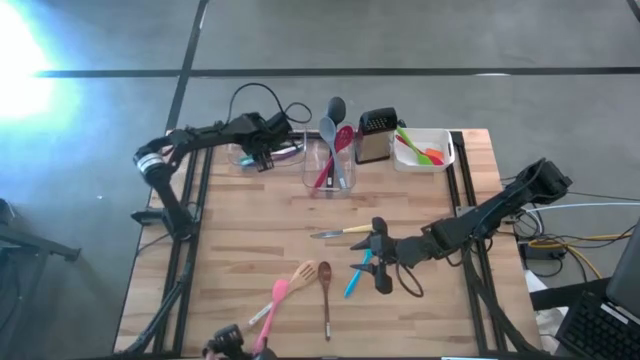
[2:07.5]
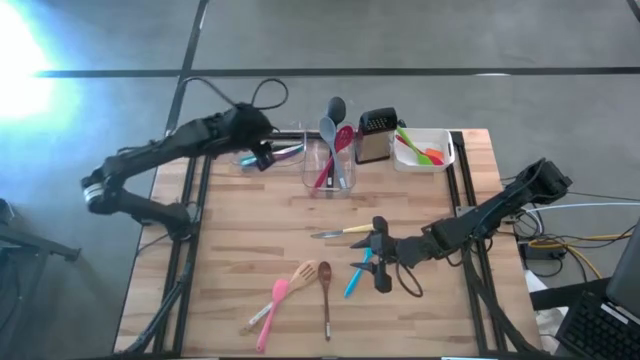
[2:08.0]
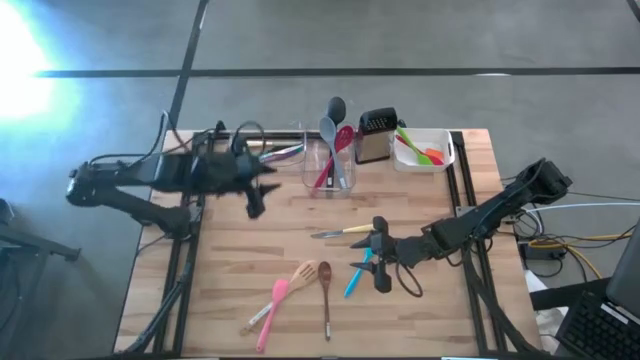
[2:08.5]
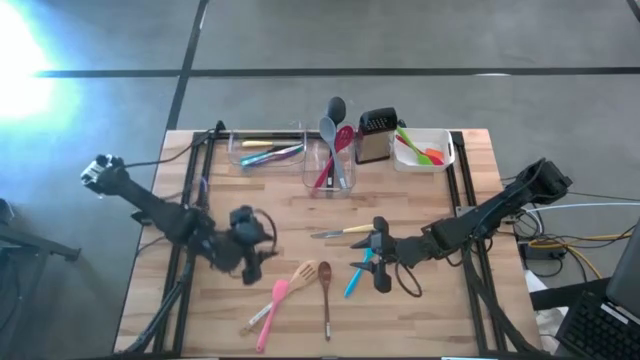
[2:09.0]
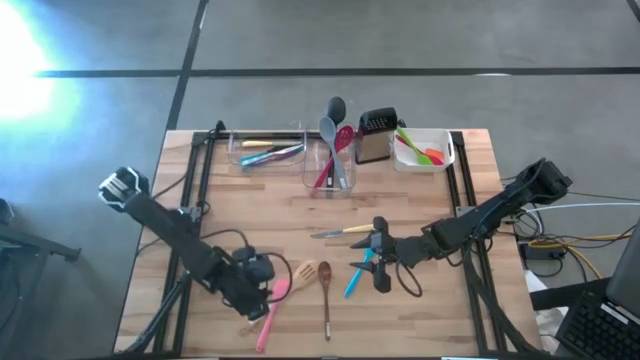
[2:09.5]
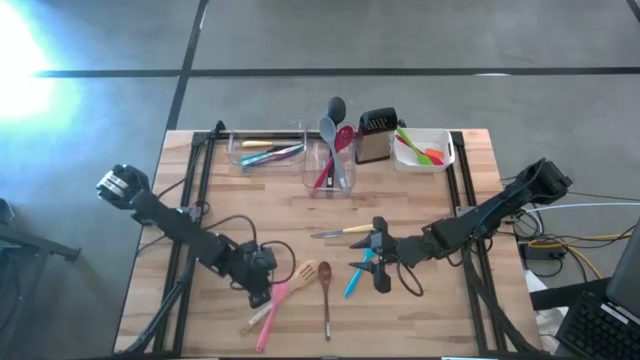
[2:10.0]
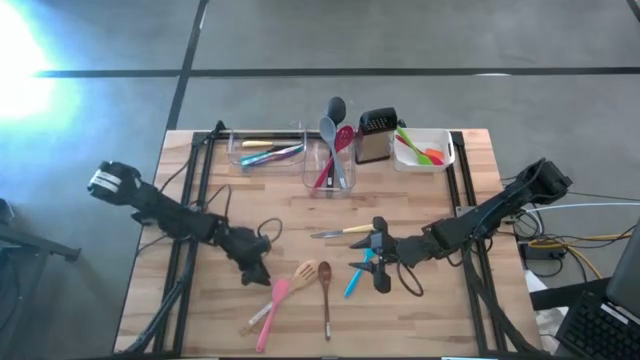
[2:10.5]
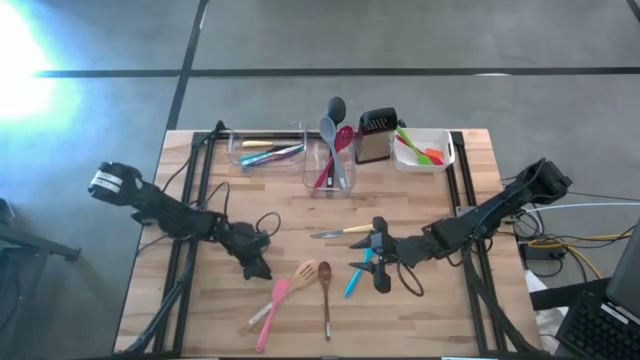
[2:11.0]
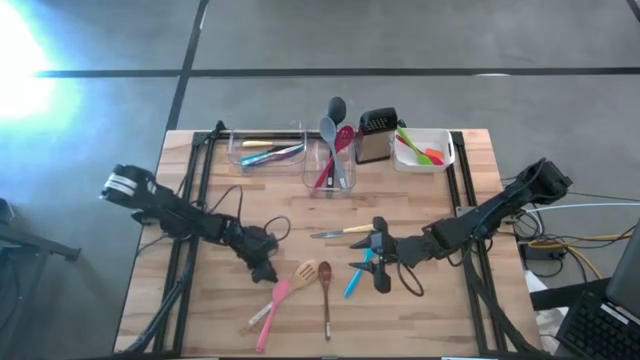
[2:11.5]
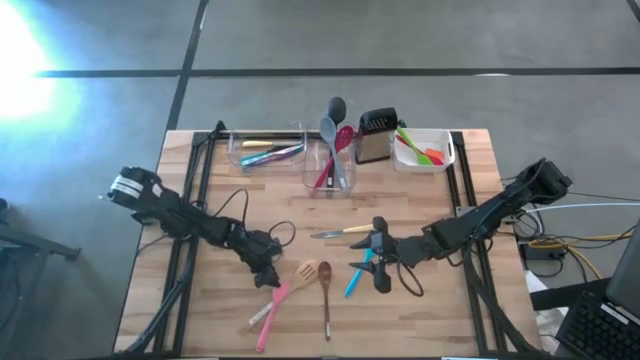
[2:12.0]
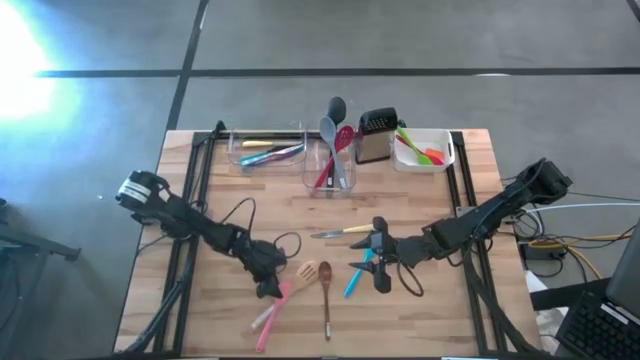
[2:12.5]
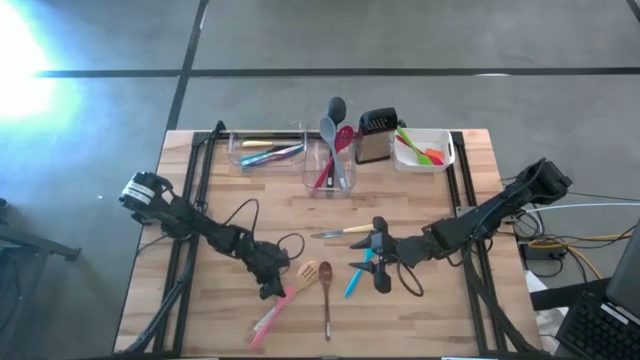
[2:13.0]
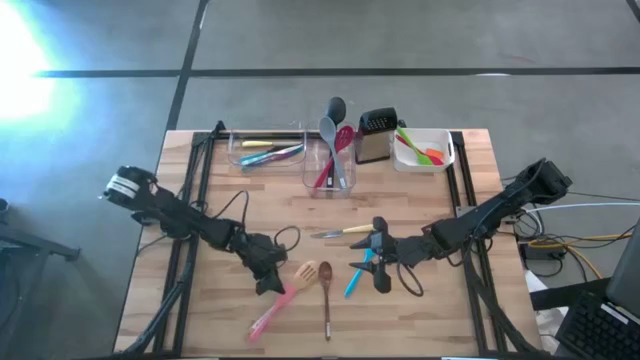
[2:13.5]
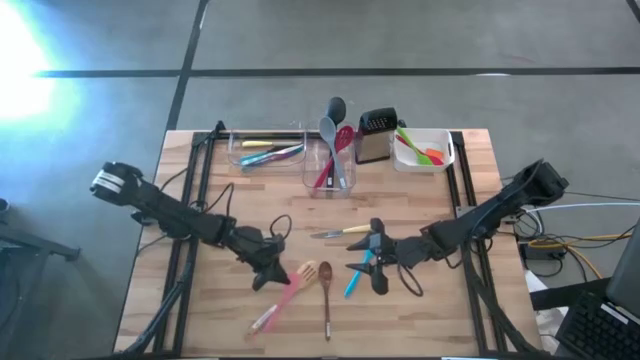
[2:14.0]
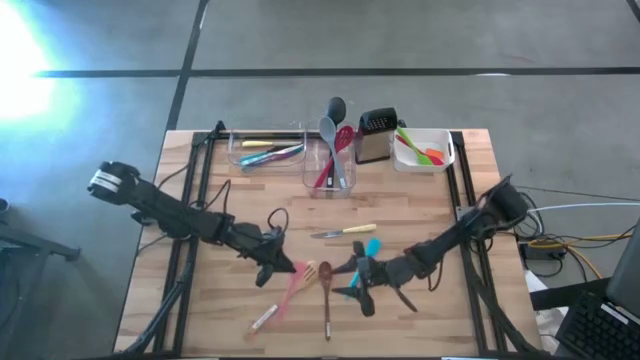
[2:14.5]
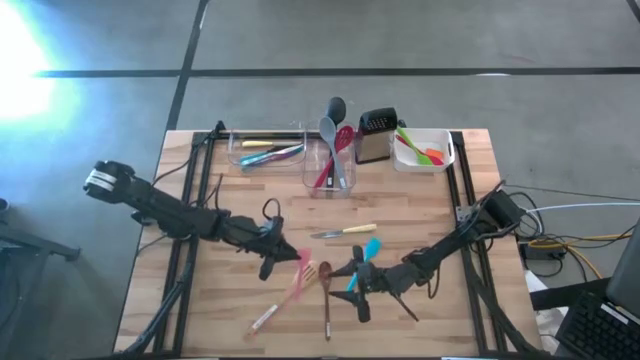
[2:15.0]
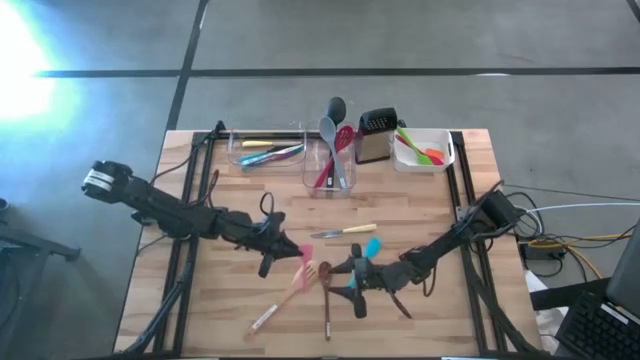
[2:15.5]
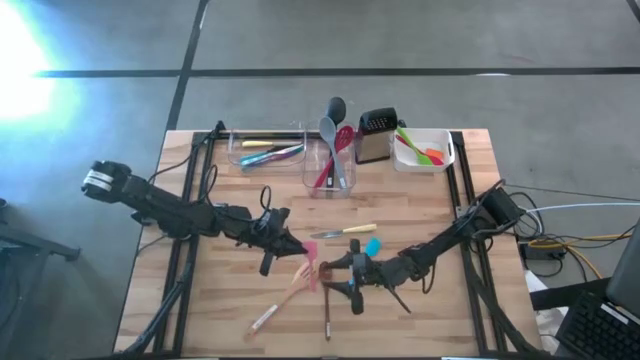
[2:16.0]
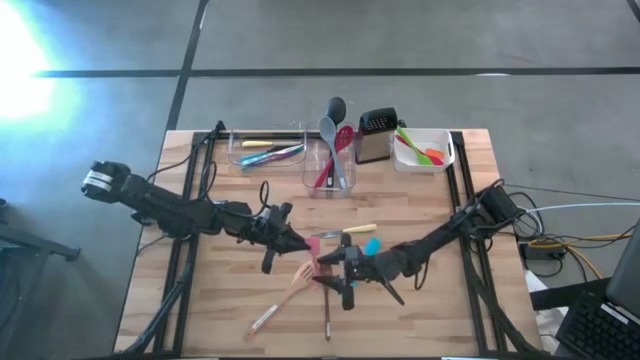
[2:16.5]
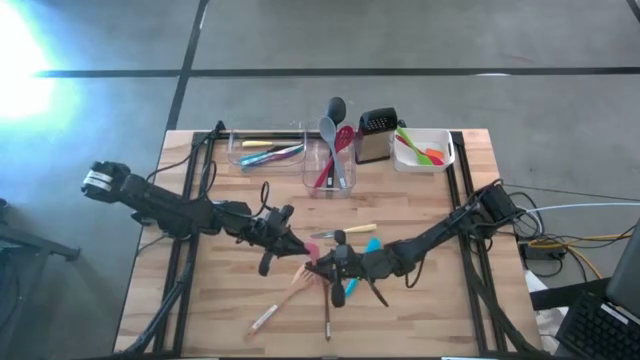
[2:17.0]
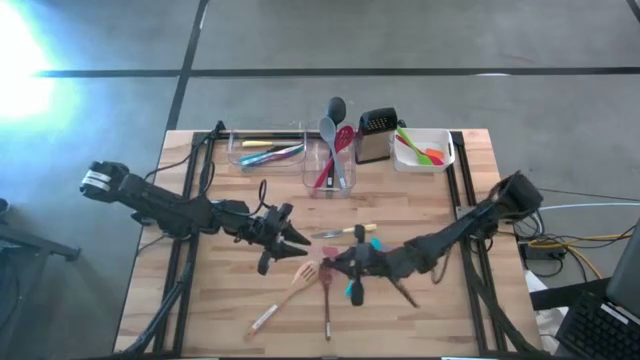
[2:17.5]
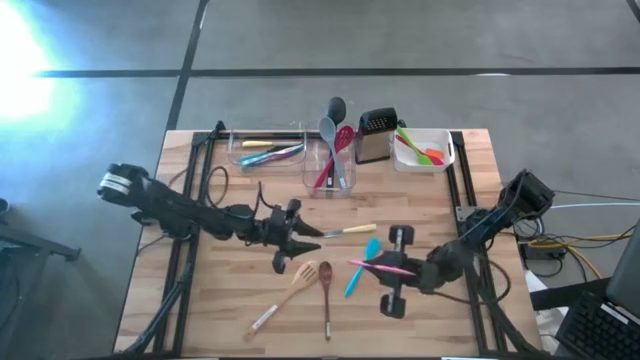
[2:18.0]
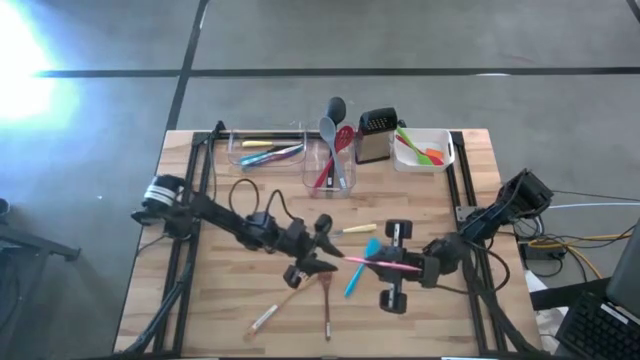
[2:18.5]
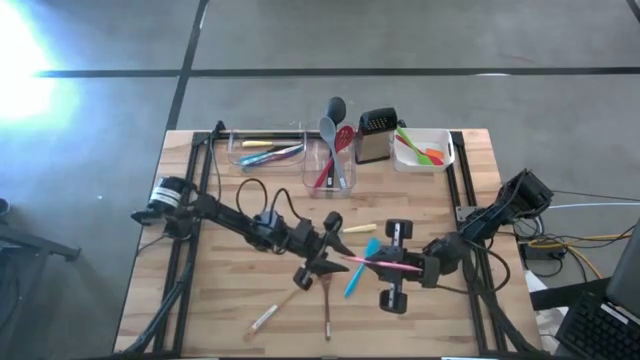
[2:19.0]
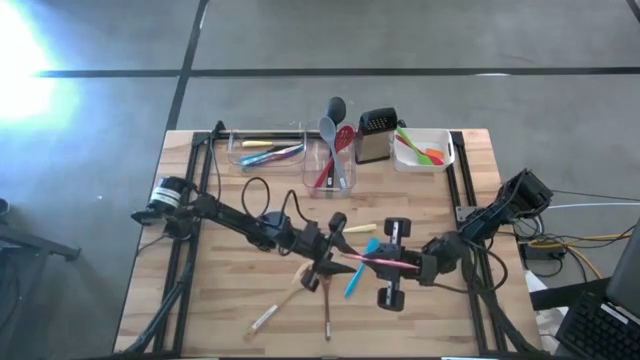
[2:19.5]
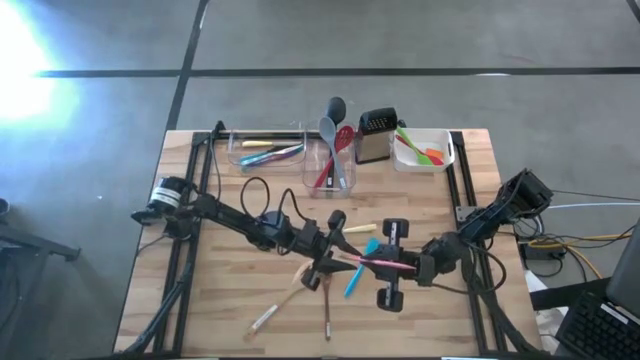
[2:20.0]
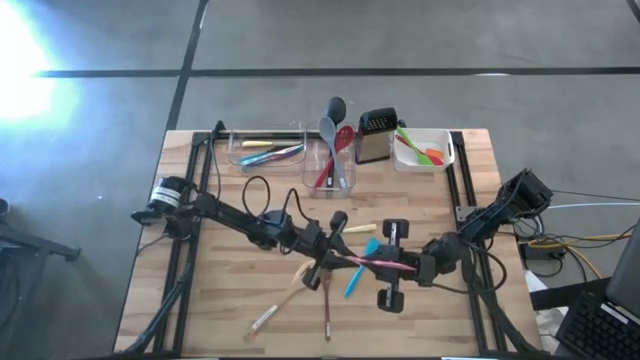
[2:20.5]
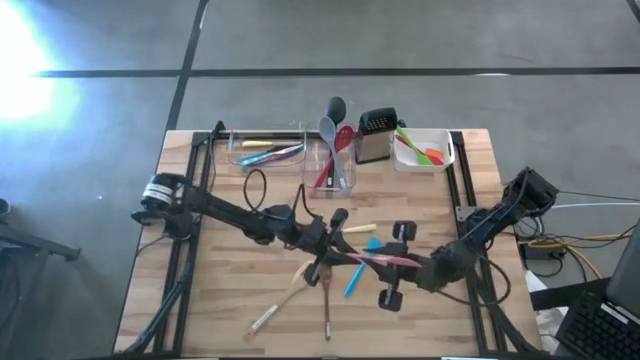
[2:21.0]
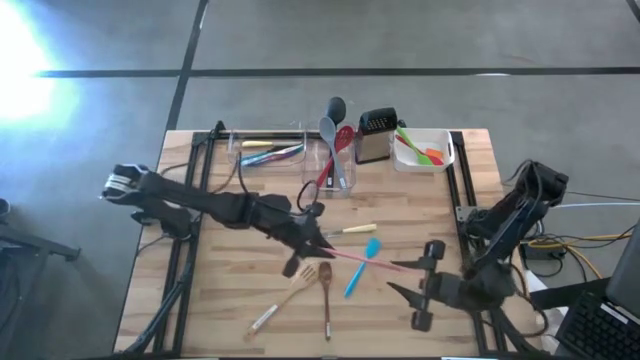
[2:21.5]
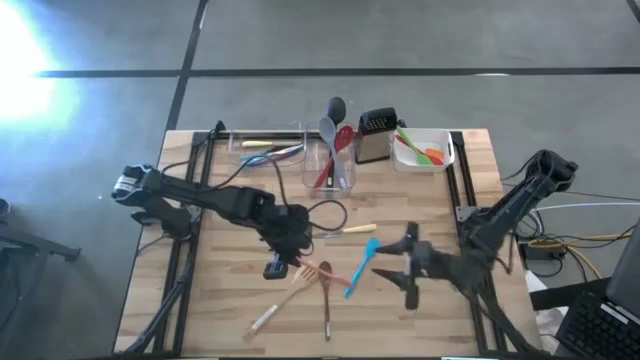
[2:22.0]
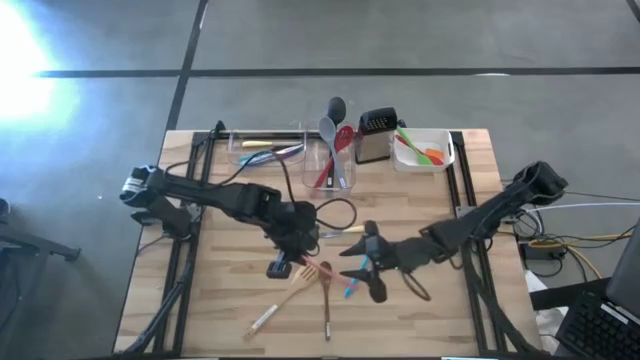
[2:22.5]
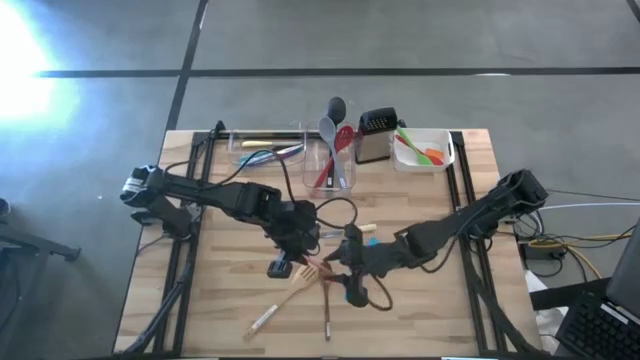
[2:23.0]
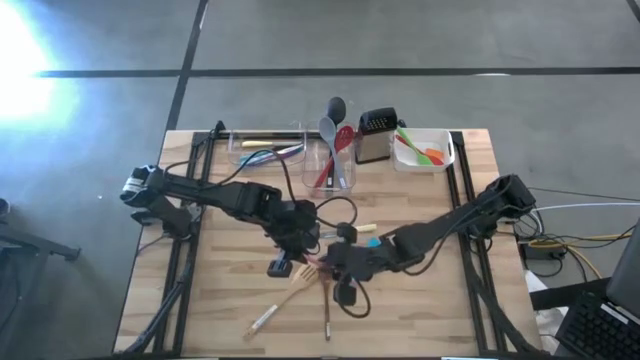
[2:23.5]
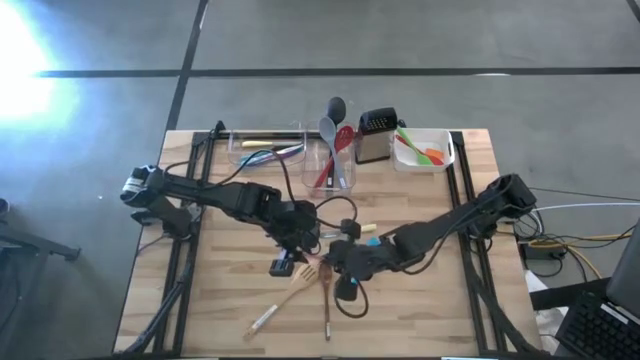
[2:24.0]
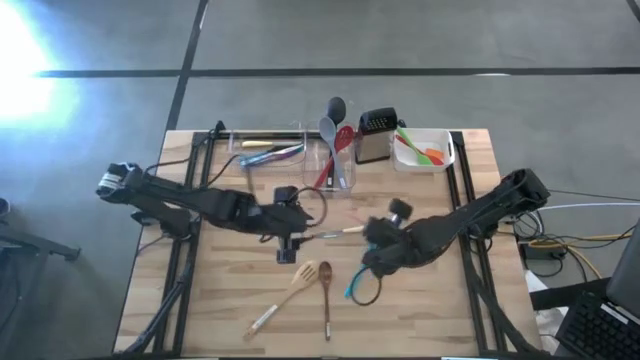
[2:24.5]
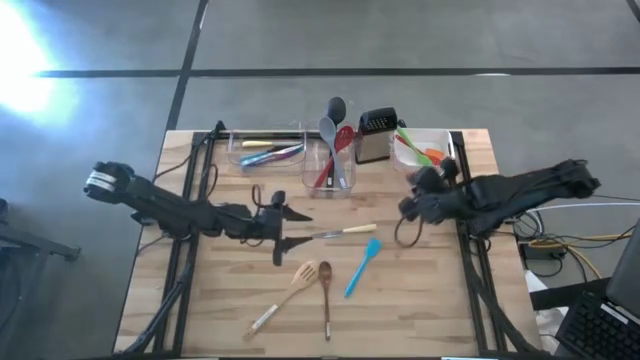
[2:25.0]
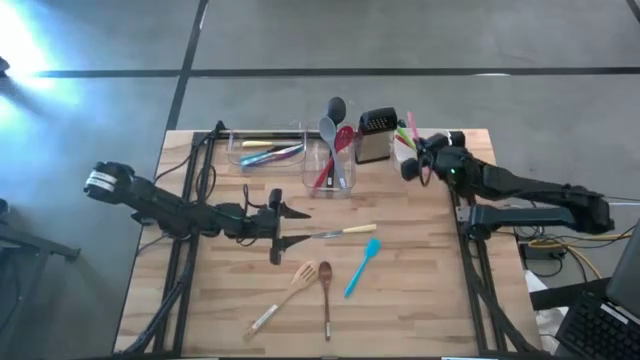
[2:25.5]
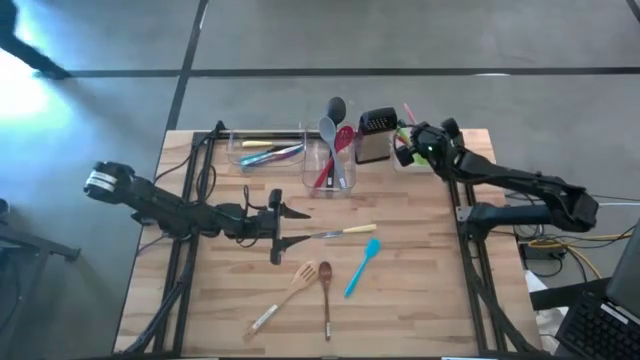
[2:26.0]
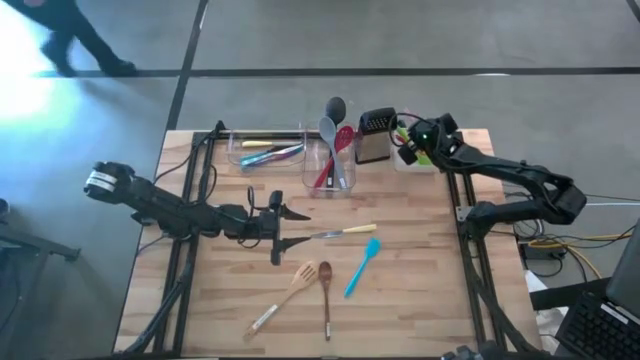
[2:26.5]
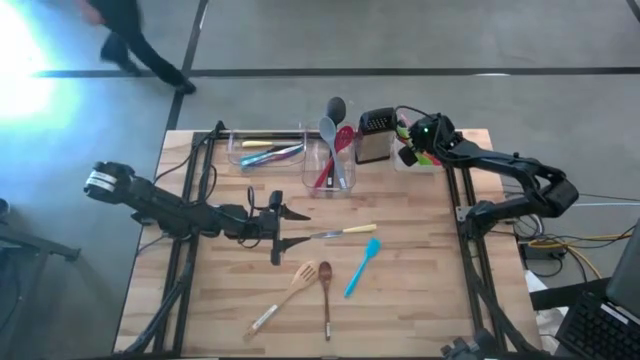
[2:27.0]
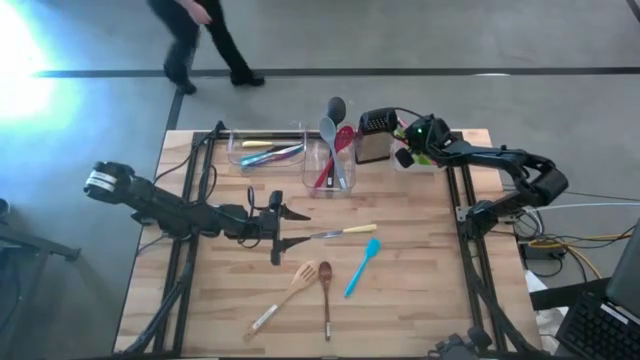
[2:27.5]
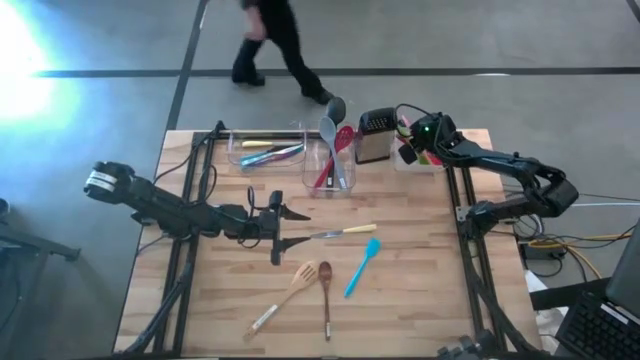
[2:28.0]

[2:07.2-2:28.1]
Task: Pick & Place Kitchen Items
Put the pink spatula into the white bin
